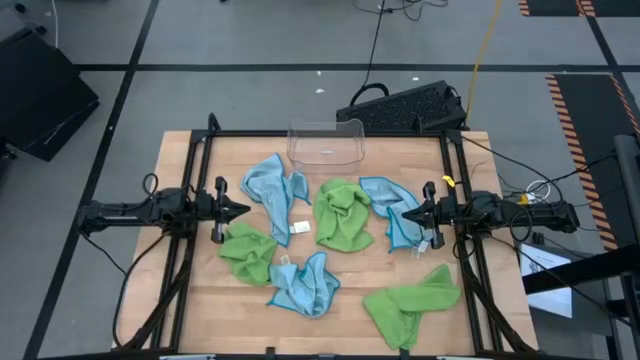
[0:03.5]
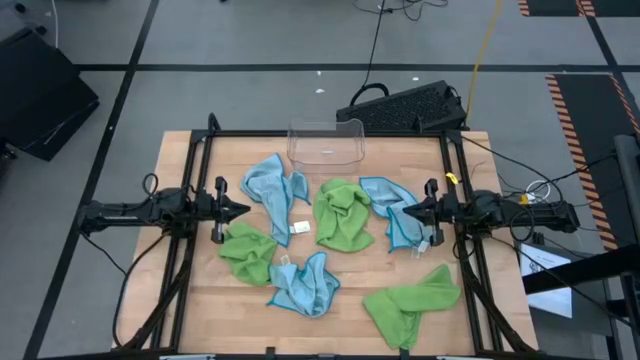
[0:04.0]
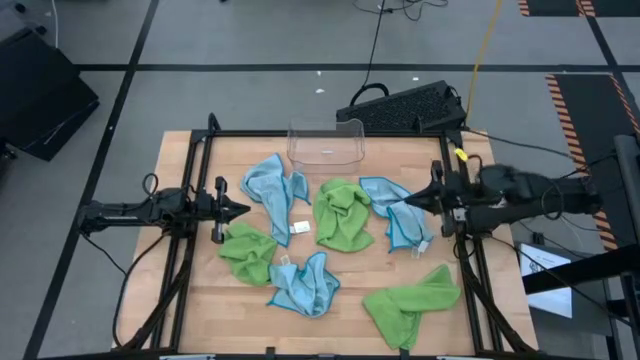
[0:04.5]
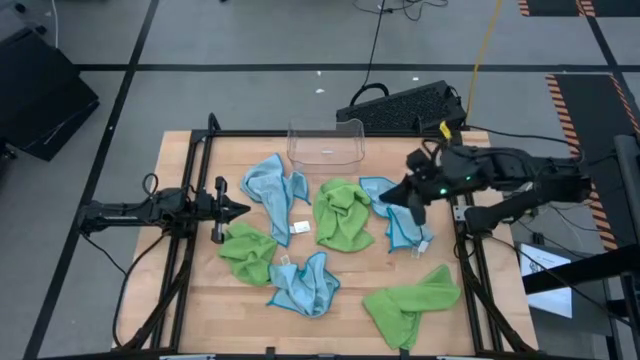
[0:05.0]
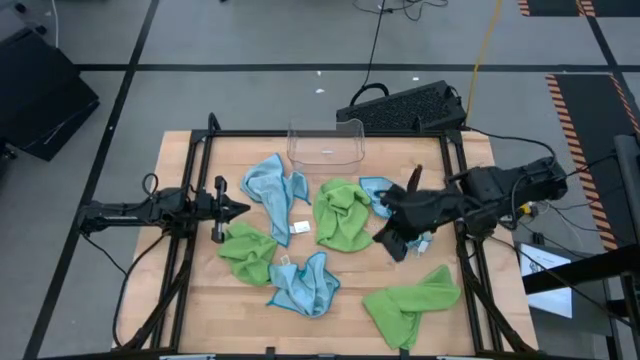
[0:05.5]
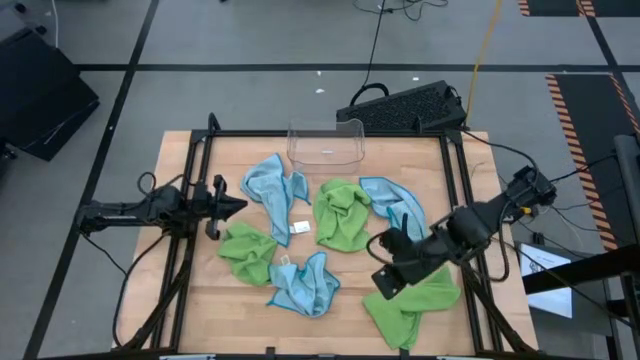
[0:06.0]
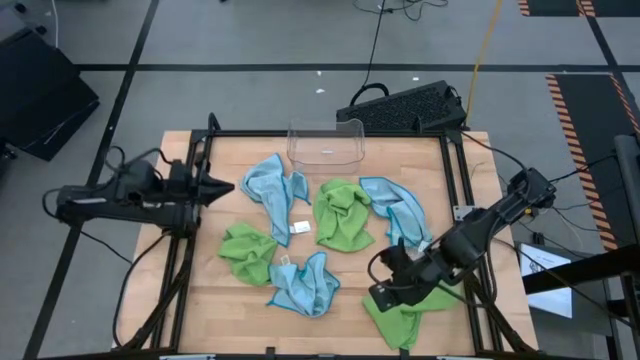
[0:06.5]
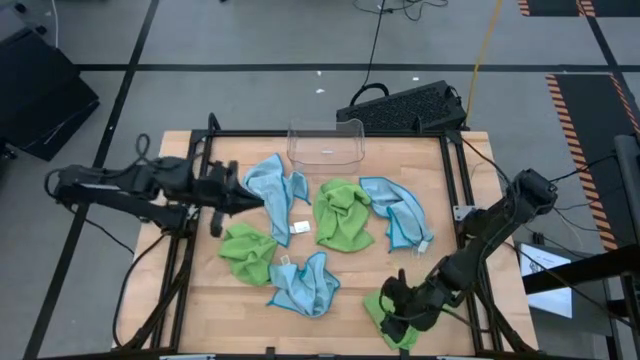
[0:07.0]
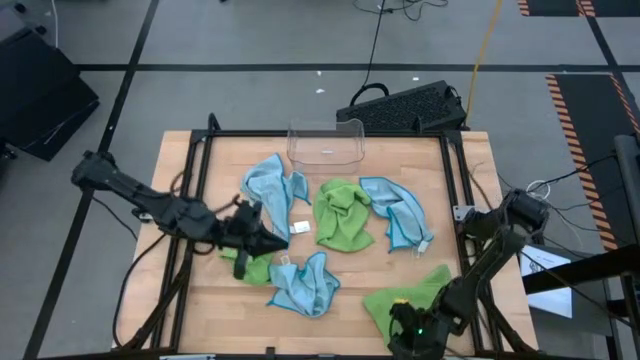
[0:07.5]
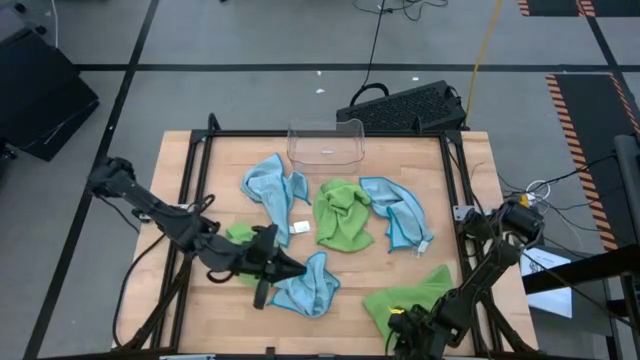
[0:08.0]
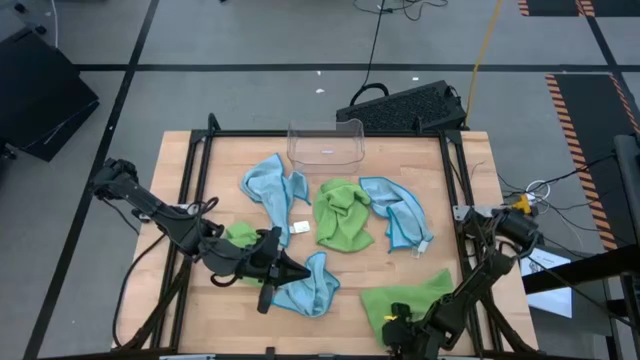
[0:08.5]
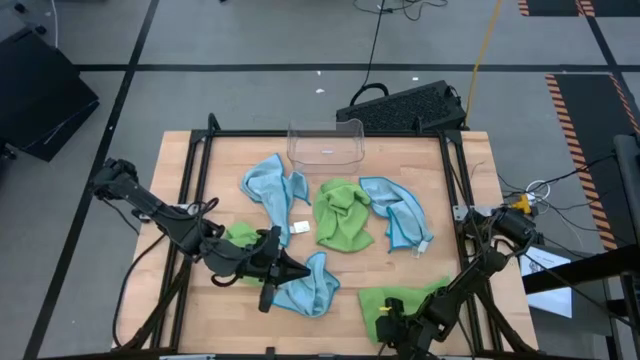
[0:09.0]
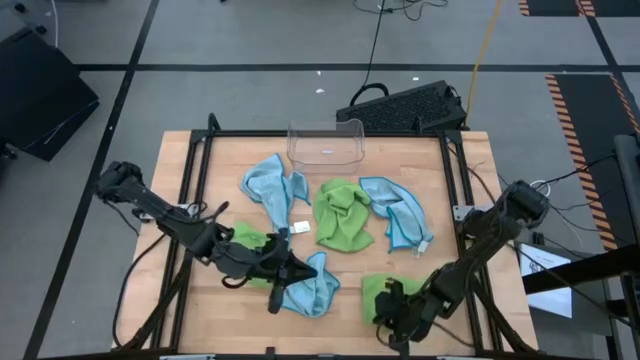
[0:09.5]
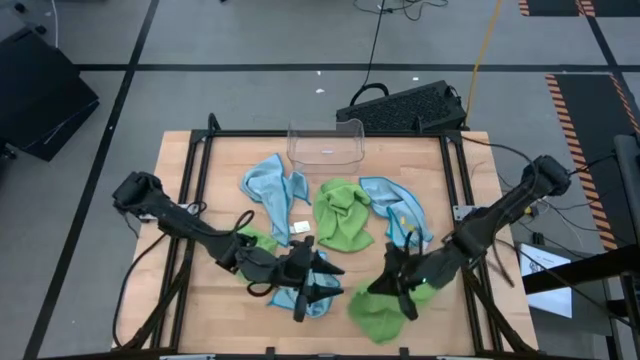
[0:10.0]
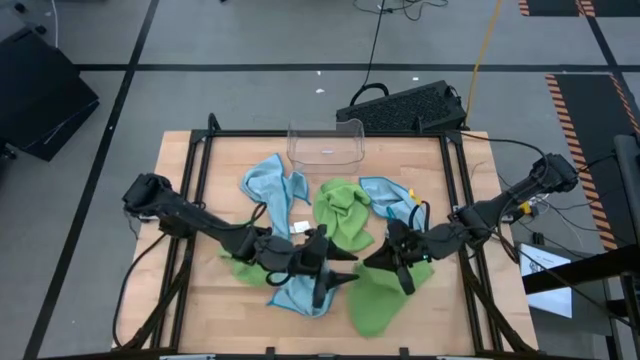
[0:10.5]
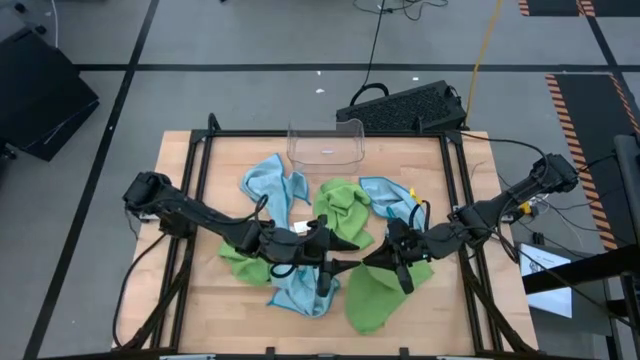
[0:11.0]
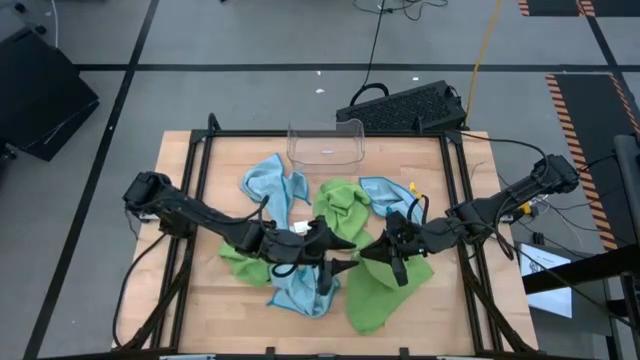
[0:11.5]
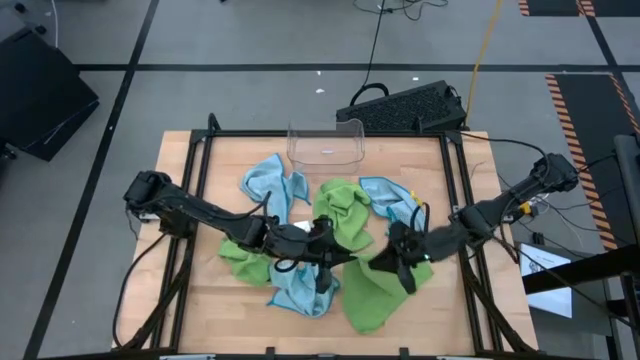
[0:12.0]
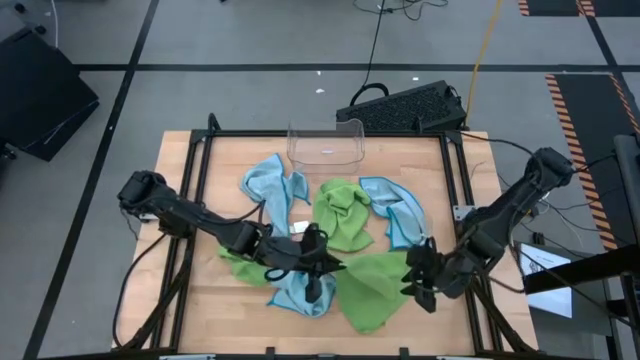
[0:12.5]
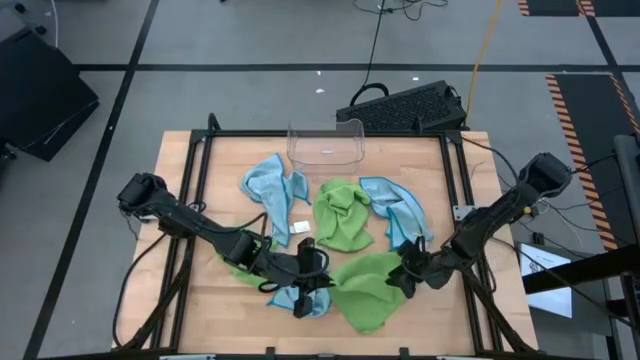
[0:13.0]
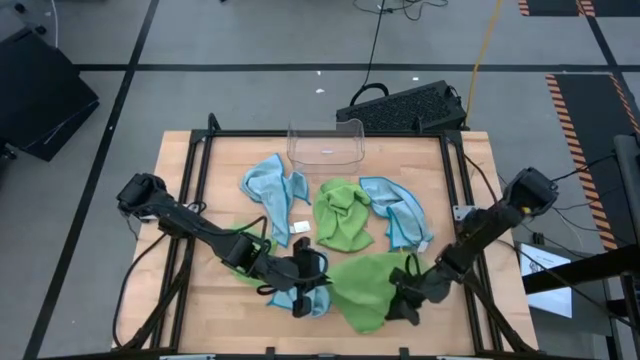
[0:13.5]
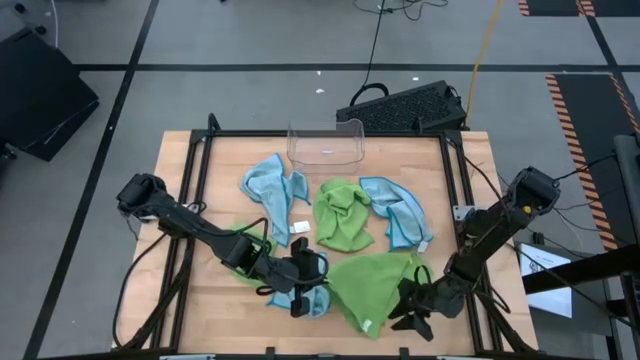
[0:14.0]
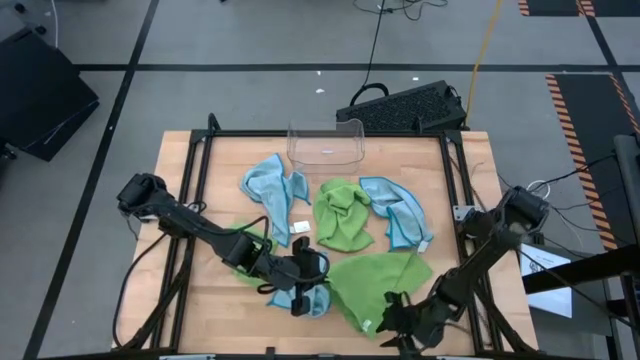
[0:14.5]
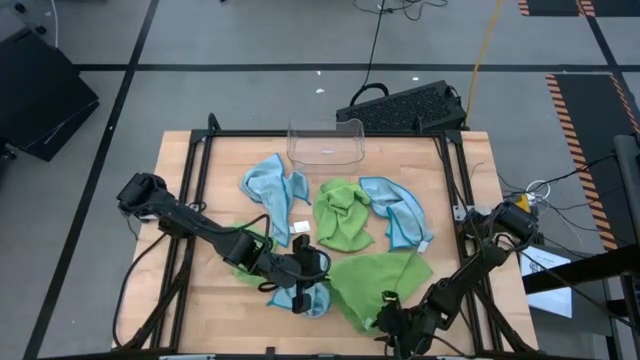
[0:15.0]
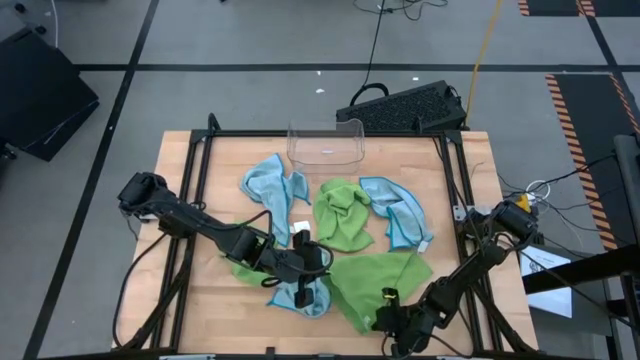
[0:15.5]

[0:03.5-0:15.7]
Task: Fold microfiber towels
Fold the bottom right green microfiber cloth

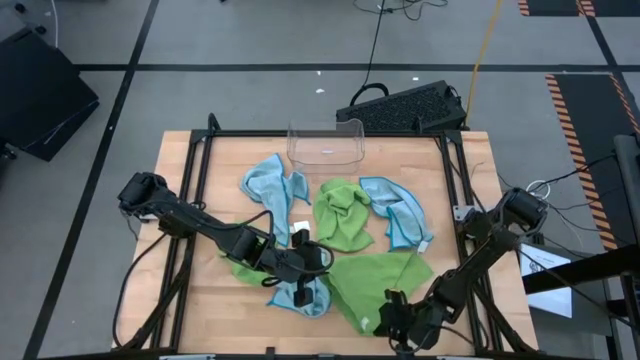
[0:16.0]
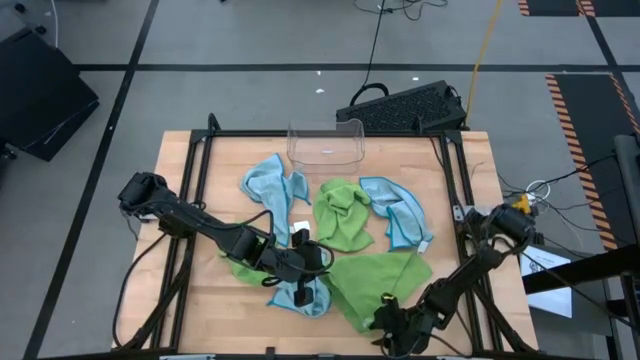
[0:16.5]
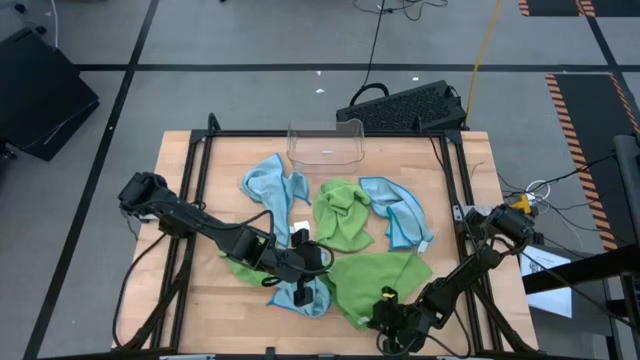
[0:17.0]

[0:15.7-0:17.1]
Fold the bottom right green microfiber cloth

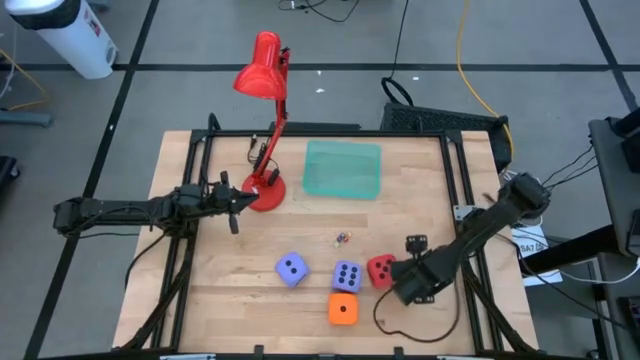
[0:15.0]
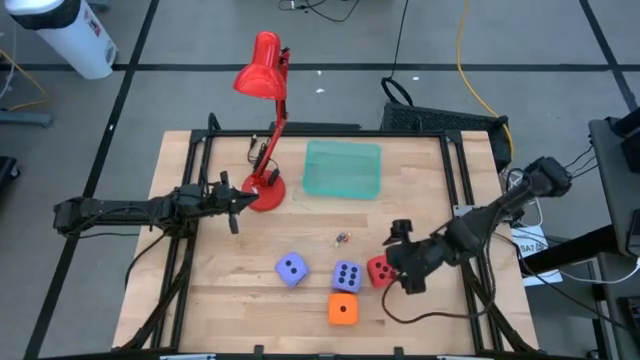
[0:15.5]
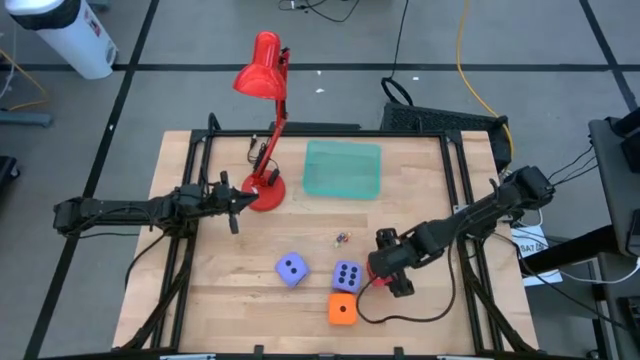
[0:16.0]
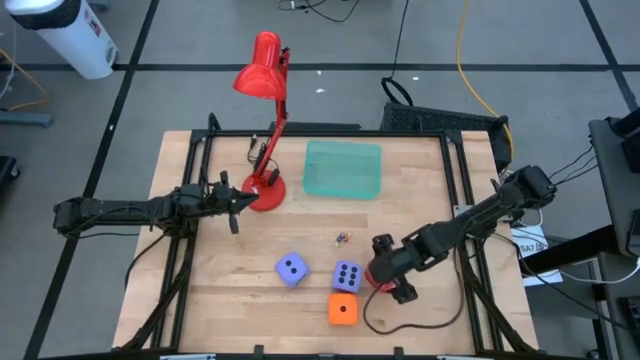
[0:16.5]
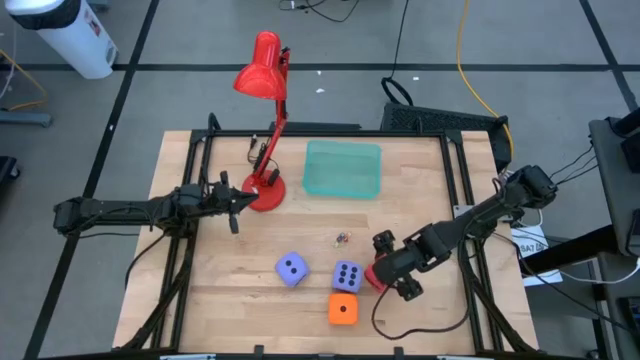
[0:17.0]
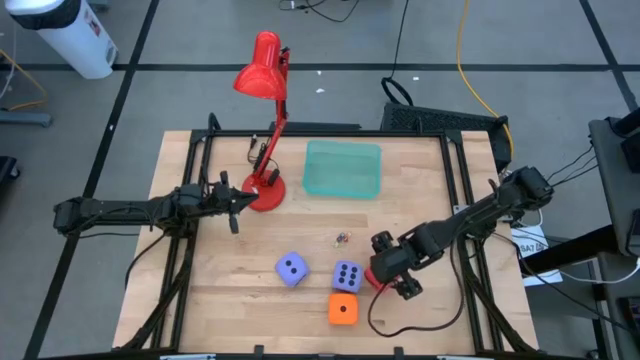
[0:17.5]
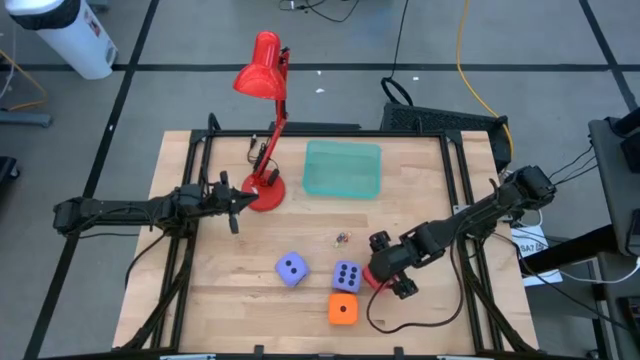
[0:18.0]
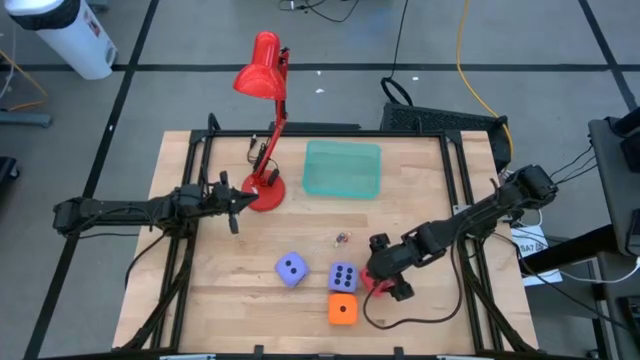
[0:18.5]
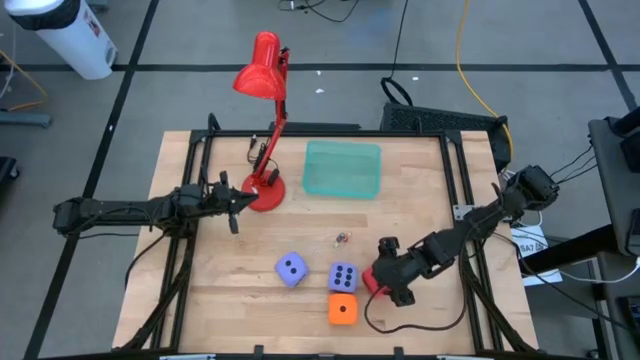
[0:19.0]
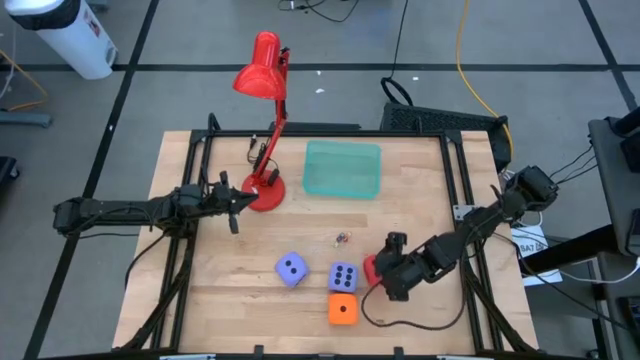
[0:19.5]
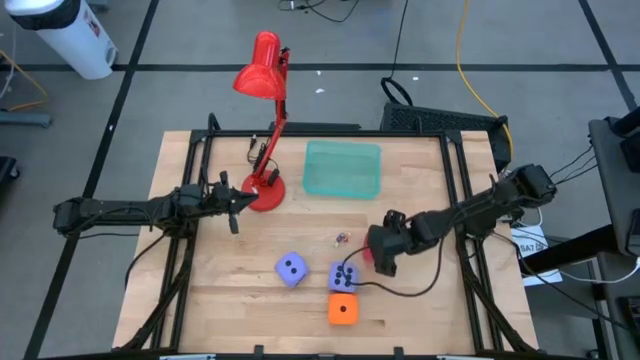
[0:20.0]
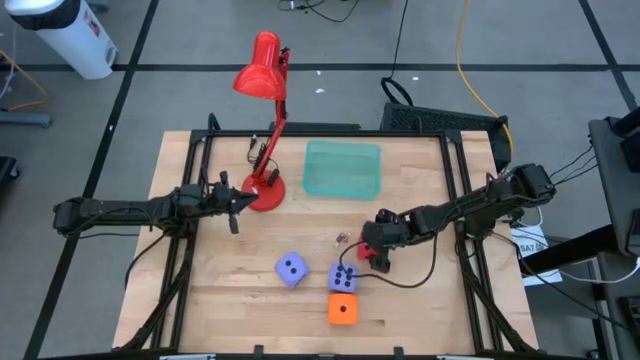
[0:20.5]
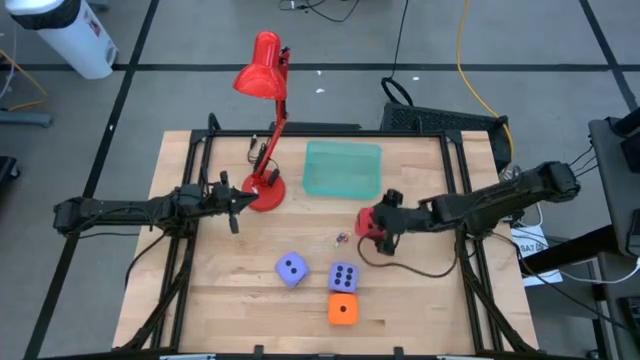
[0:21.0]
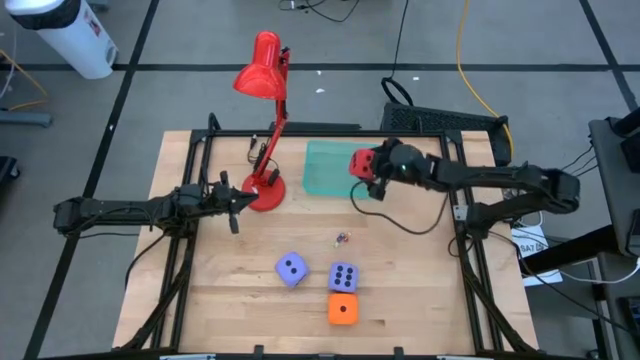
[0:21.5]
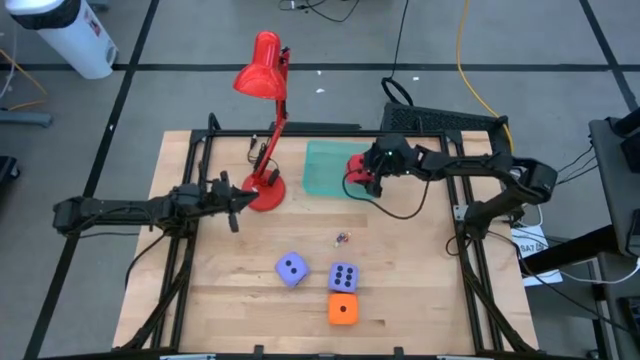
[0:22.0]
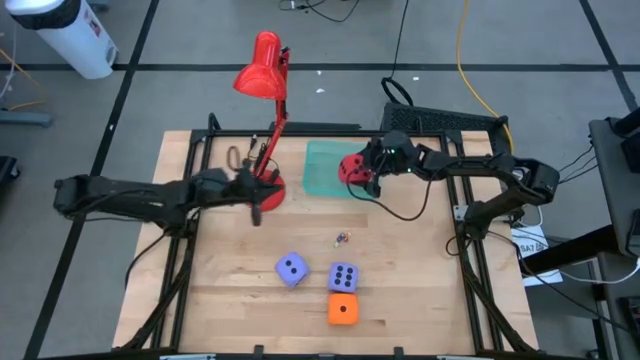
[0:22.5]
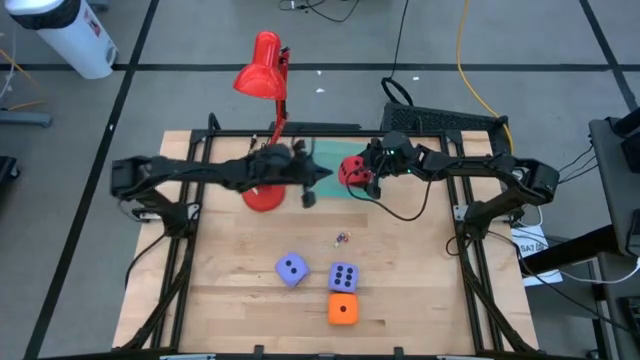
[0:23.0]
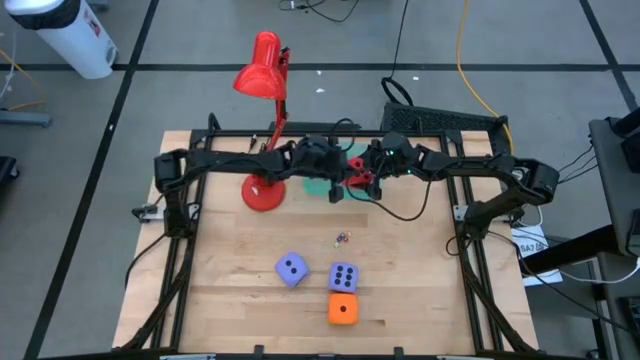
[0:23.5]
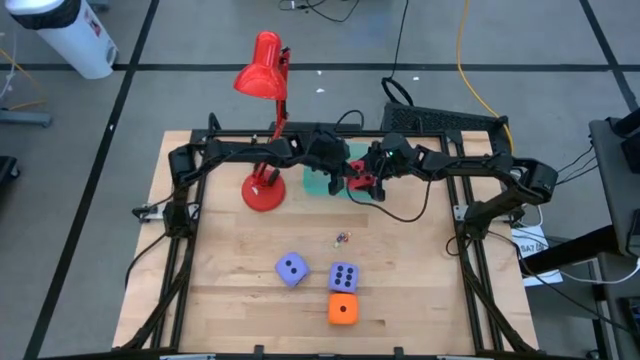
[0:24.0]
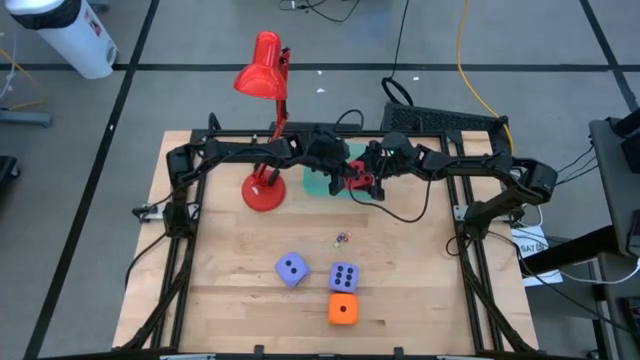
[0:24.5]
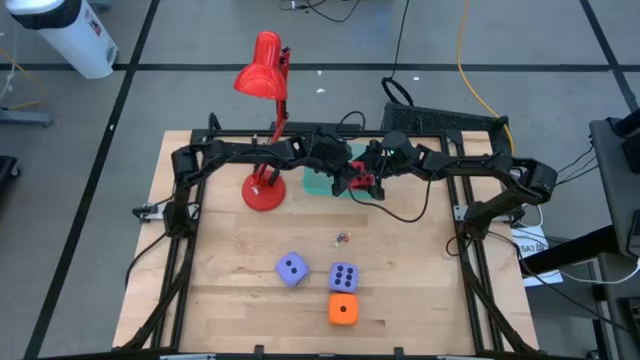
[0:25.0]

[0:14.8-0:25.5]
Task: Pick & Place Dice
Put the red die into the green bin
